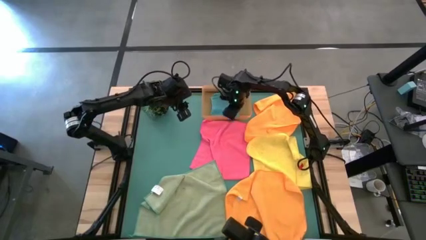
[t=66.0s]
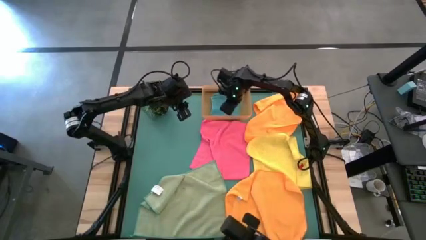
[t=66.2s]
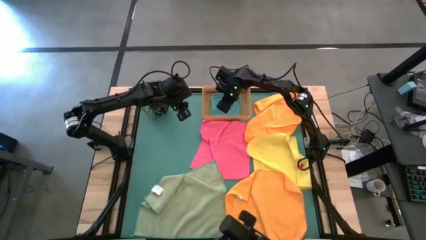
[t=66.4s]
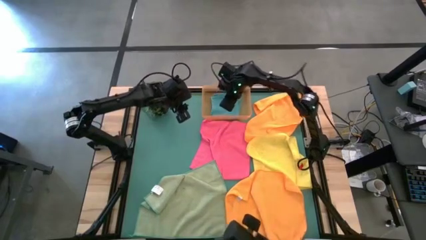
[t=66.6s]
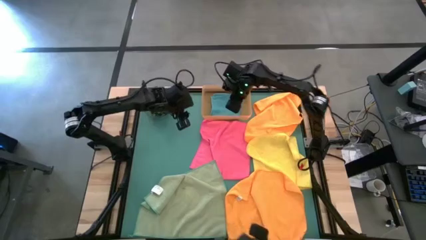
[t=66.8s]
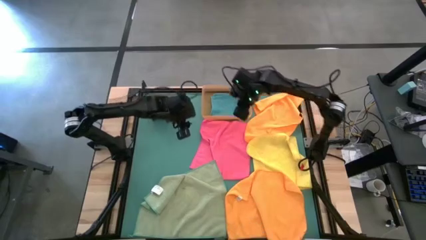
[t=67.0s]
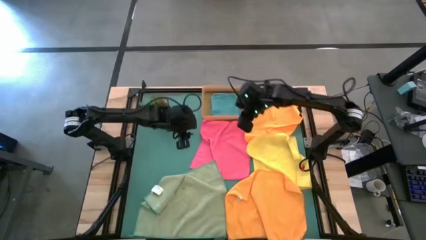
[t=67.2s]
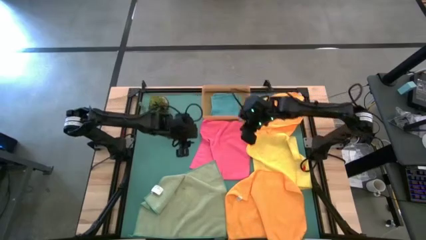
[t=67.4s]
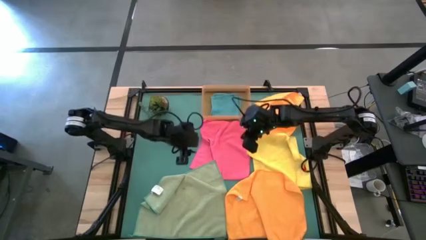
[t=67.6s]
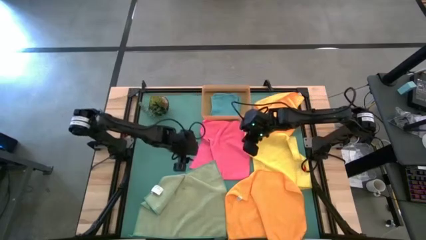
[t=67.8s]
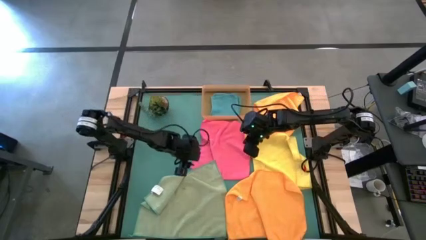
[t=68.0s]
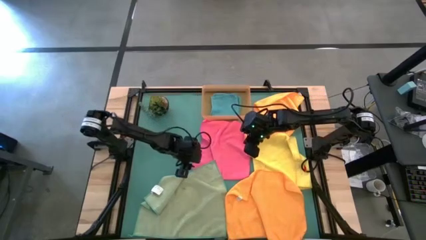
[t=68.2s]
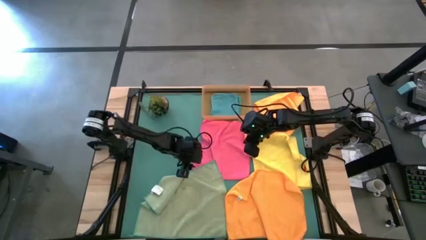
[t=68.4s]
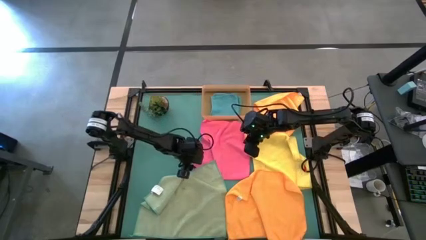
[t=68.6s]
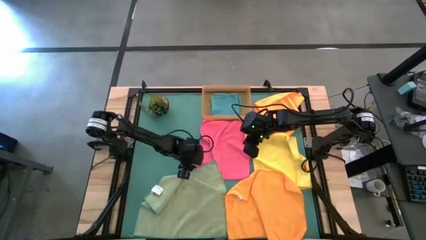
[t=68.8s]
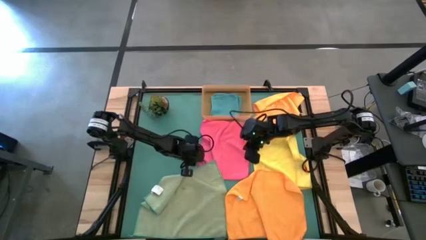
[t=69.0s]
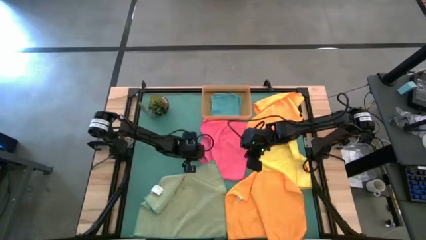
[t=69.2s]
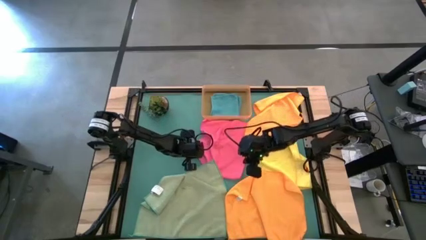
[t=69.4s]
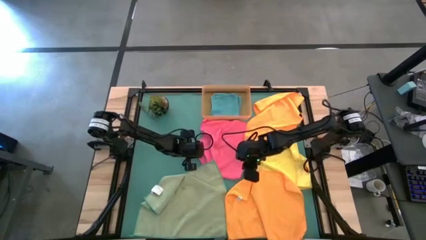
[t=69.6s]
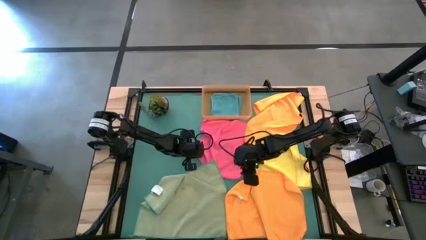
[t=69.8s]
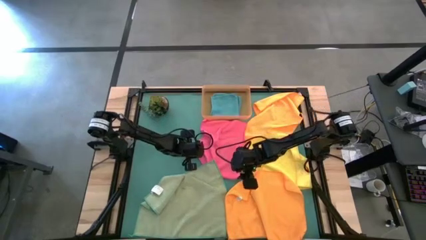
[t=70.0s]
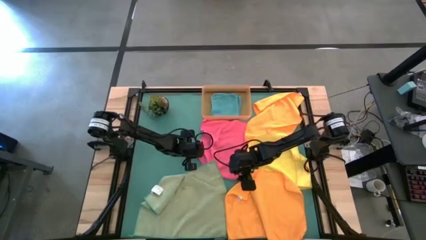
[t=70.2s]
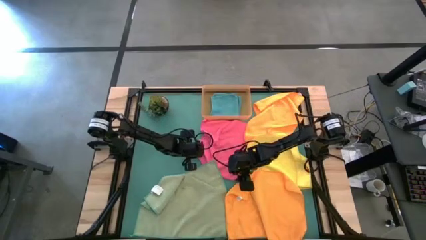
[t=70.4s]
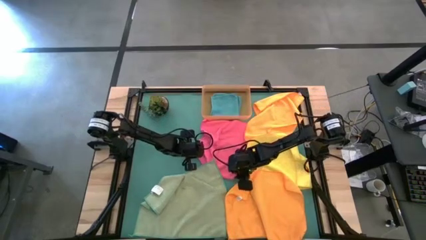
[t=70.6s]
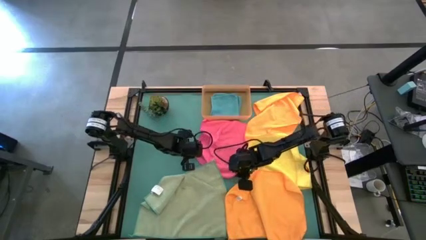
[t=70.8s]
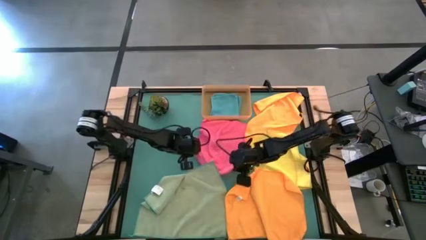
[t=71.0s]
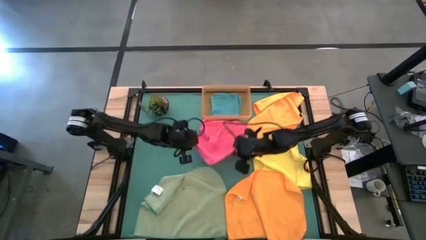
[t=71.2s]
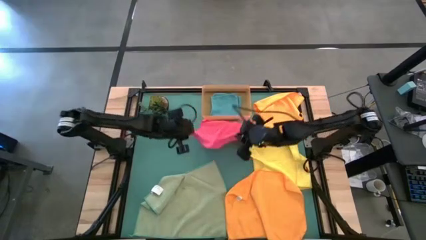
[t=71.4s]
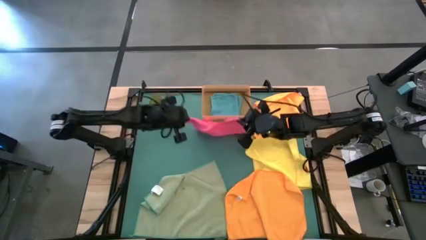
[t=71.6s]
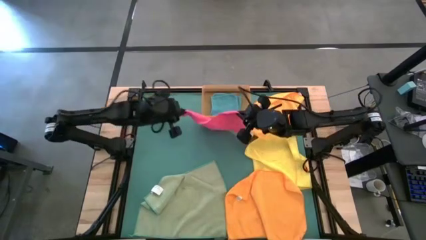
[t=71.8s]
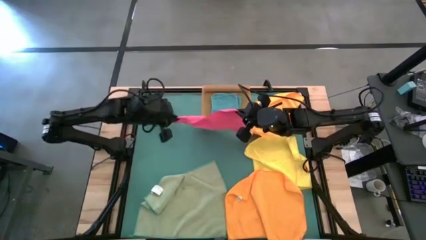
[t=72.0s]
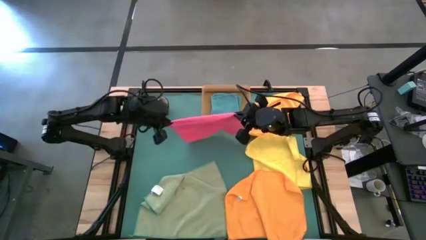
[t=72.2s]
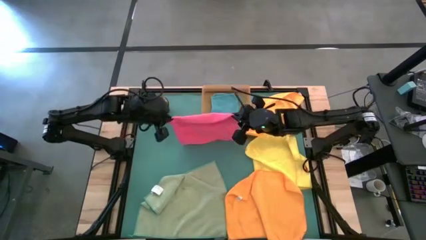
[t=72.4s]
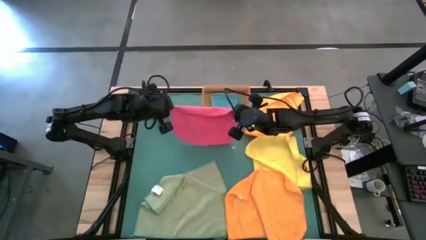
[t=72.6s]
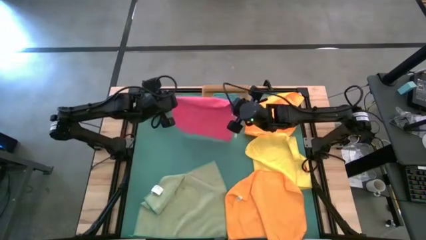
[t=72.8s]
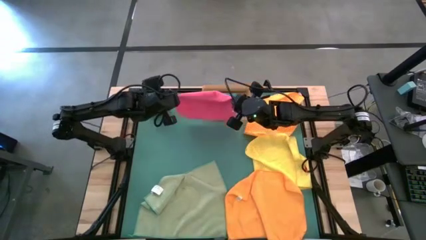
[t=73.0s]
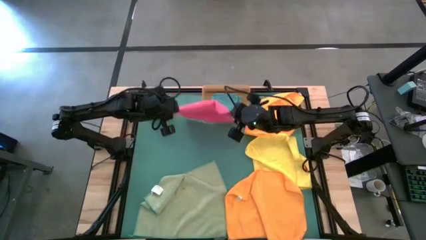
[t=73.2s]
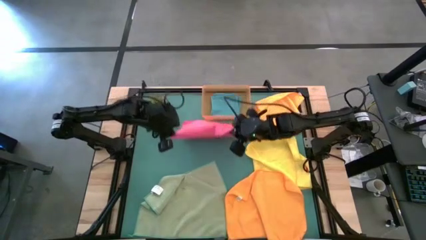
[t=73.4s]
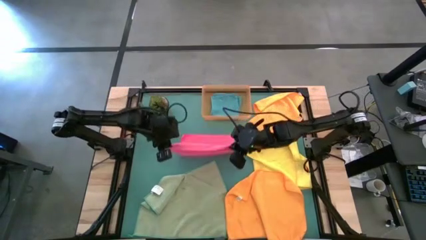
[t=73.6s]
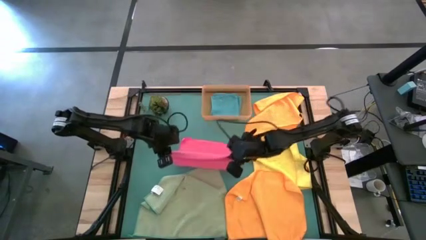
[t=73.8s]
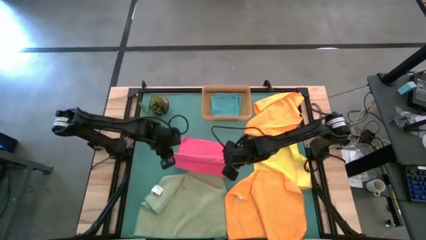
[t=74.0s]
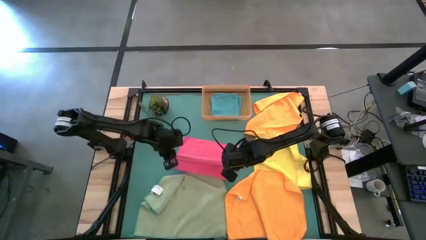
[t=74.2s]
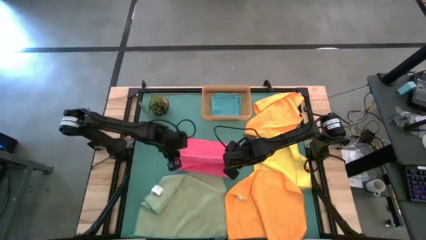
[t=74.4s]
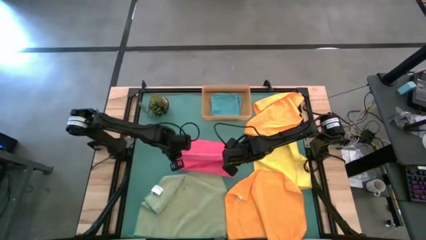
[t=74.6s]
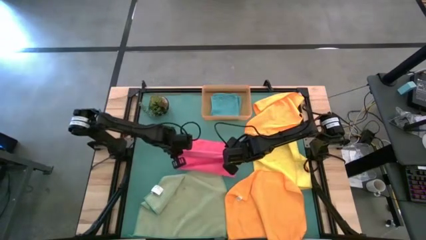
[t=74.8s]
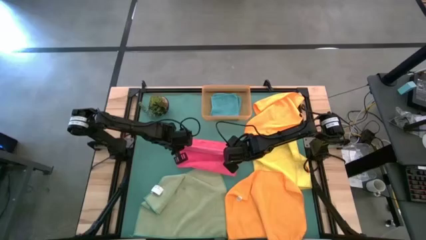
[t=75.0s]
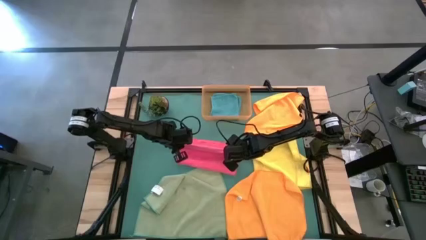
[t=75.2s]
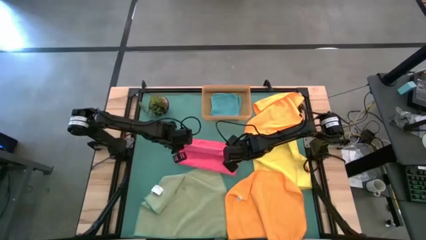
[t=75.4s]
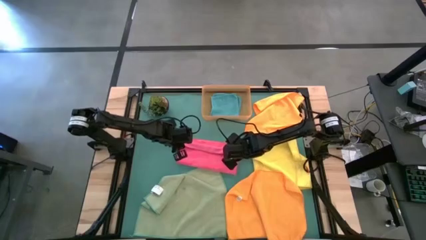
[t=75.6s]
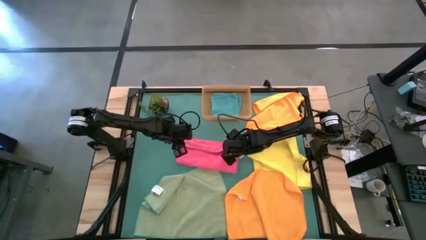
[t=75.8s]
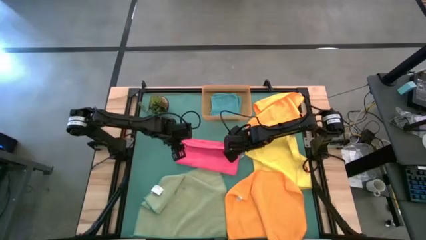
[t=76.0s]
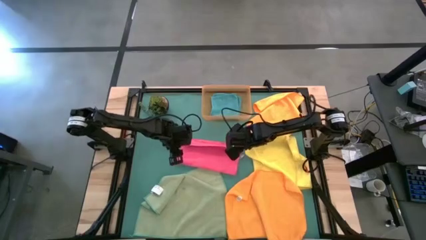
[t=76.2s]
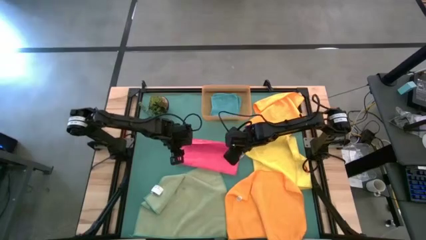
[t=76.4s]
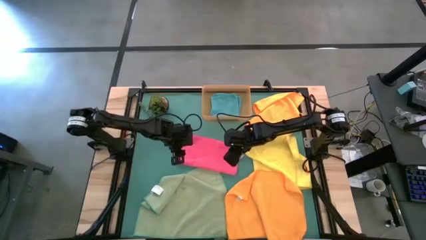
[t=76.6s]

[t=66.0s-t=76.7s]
Task: Fold microfiber towels
Fold the pink microfiber towel

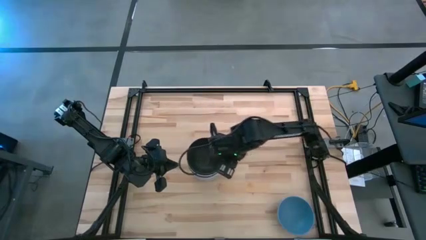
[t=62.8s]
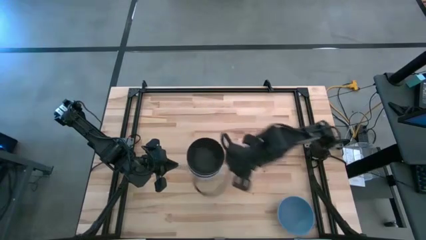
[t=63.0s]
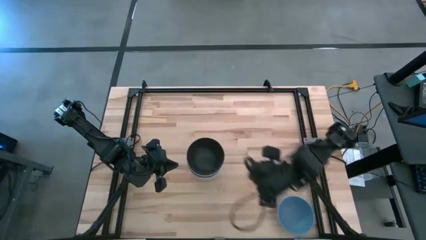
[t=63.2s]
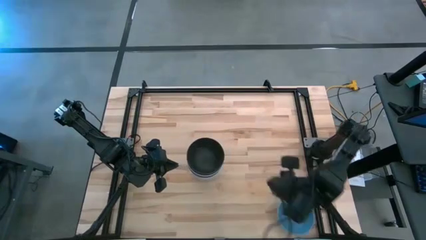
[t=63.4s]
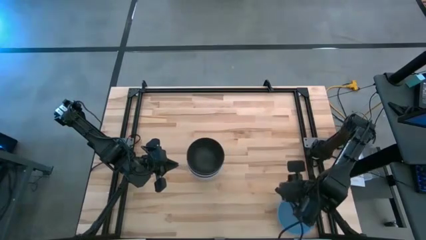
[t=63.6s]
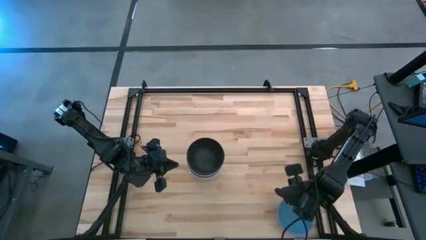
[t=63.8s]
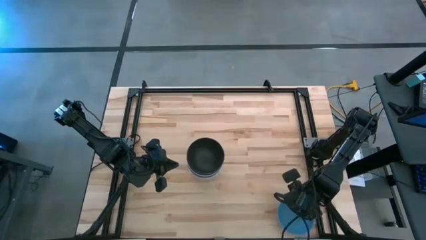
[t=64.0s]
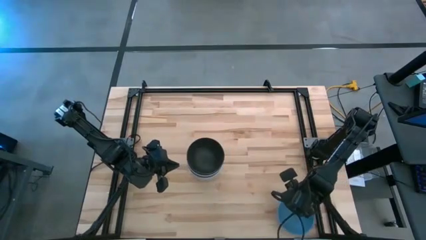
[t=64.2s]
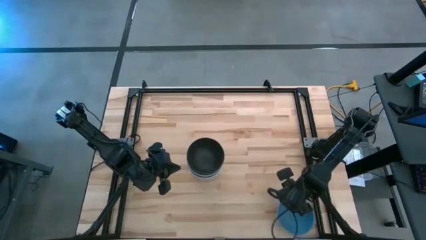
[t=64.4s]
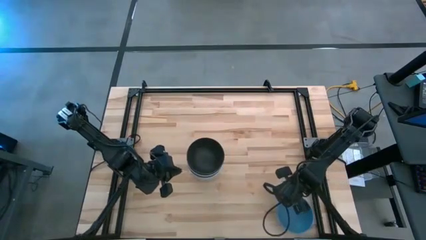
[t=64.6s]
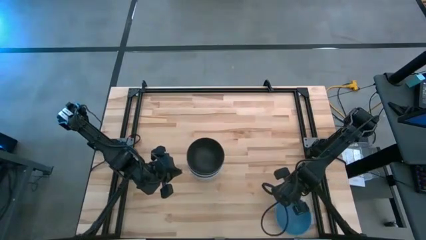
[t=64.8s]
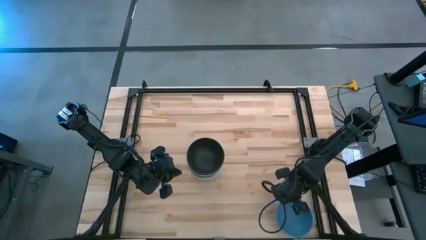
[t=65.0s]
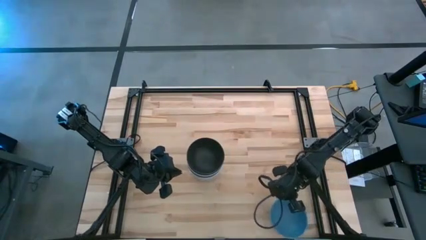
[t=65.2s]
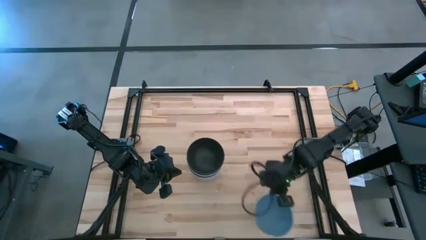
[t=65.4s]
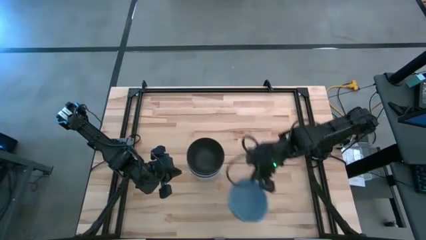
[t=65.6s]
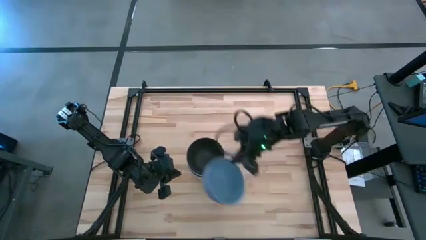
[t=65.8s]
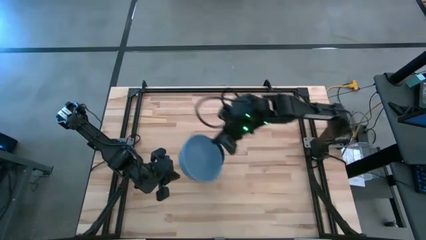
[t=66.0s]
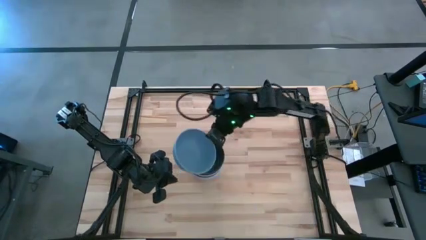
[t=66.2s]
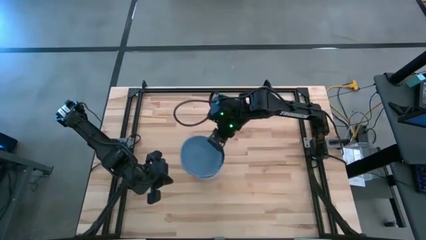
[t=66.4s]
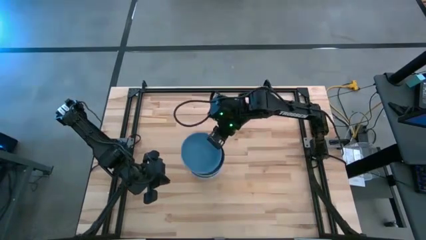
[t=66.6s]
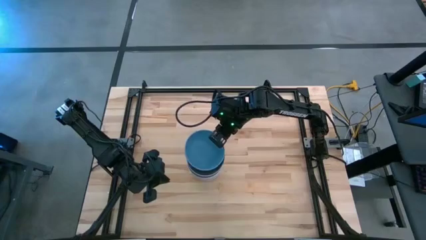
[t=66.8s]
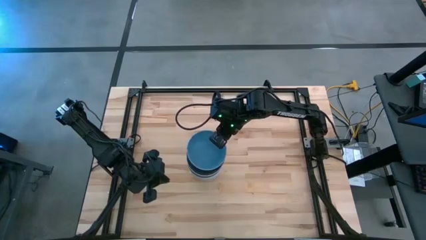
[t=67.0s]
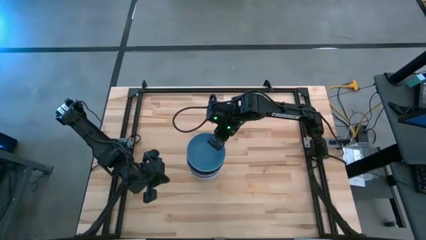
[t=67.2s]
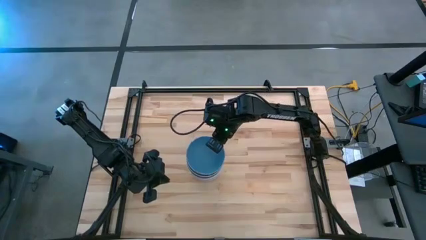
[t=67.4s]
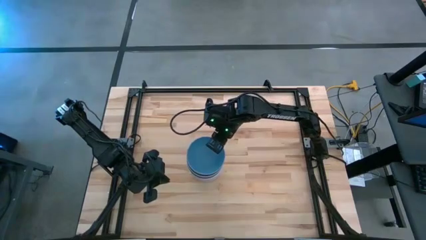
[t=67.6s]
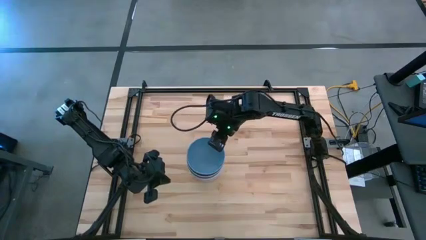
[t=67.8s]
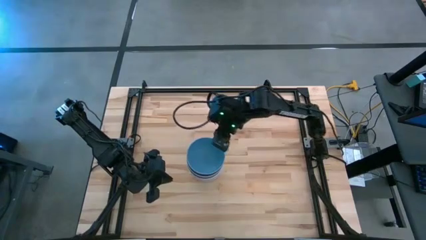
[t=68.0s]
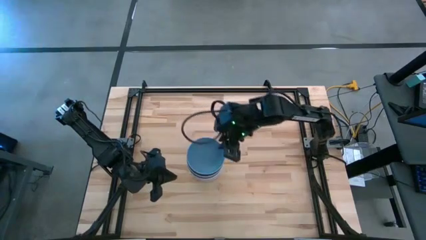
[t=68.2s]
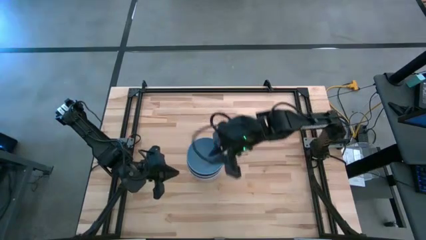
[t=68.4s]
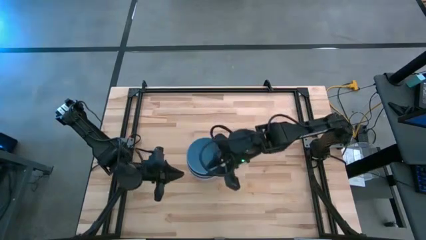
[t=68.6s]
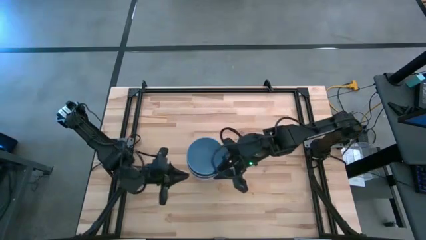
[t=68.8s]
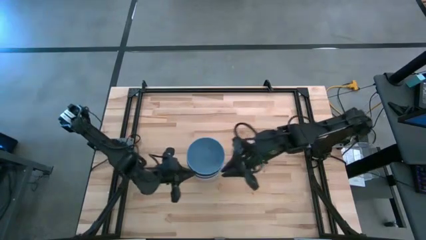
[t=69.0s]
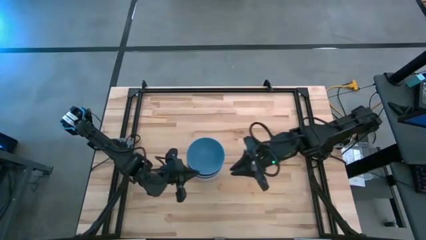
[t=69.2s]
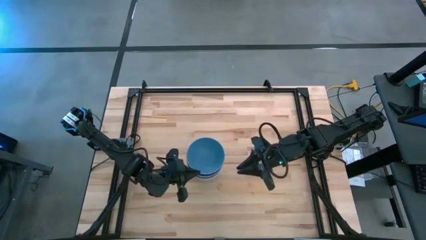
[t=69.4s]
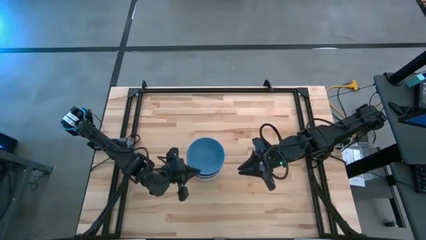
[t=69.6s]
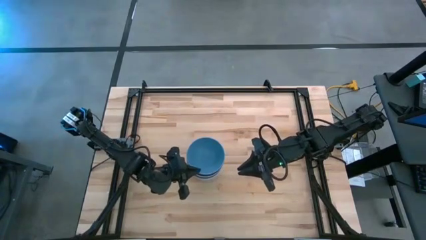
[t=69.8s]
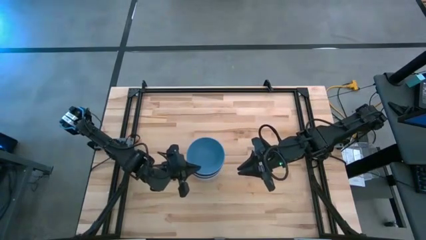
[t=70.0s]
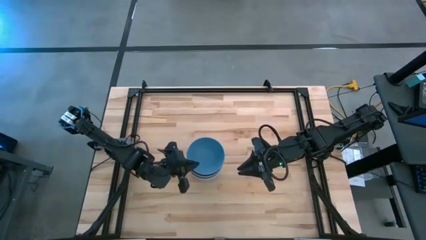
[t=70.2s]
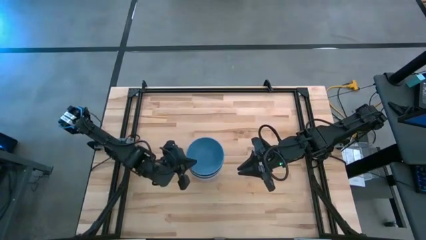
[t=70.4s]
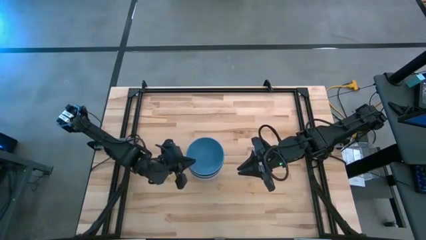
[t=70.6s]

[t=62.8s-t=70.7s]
Task: Nest bowls inside each other
Stack the blue bowl on top of the black bowl
